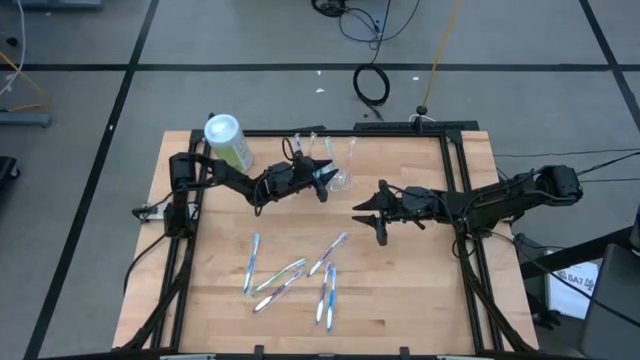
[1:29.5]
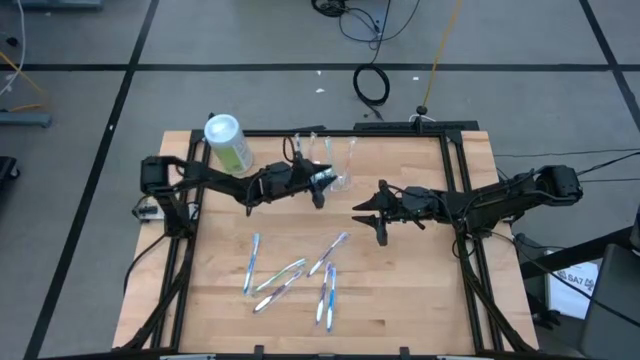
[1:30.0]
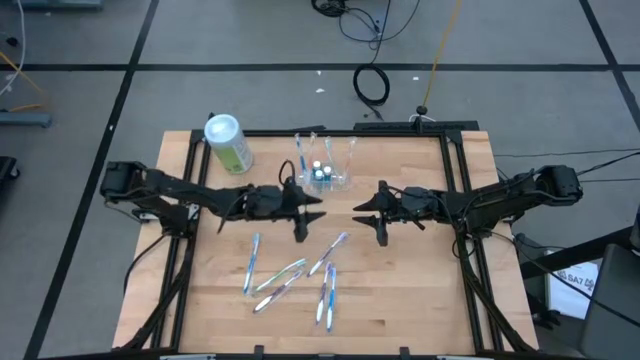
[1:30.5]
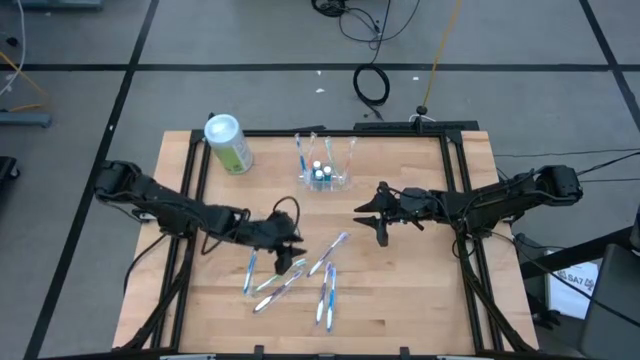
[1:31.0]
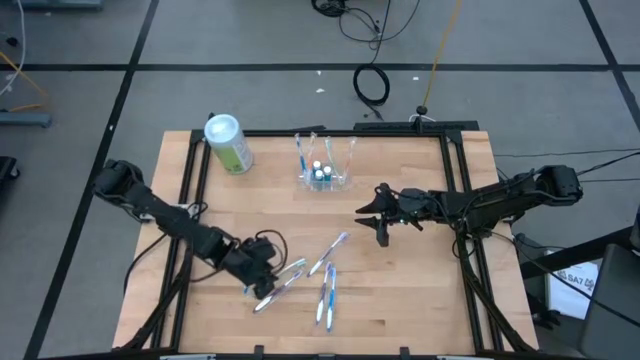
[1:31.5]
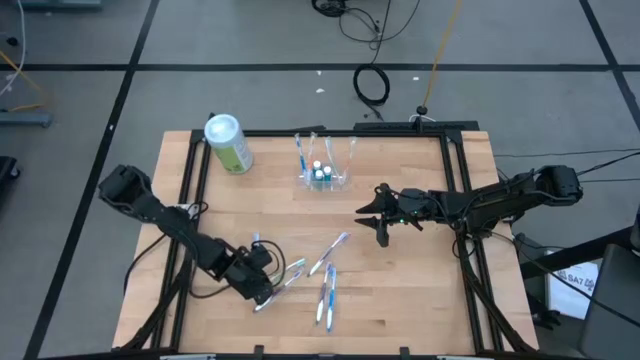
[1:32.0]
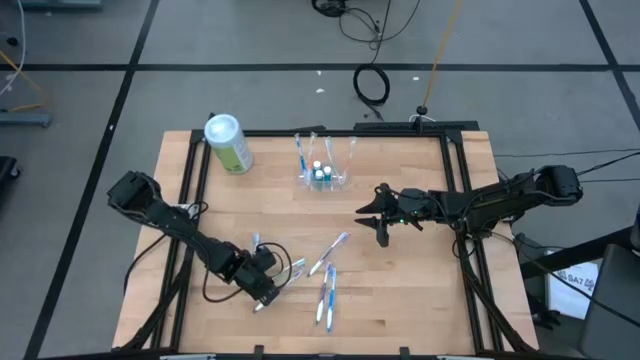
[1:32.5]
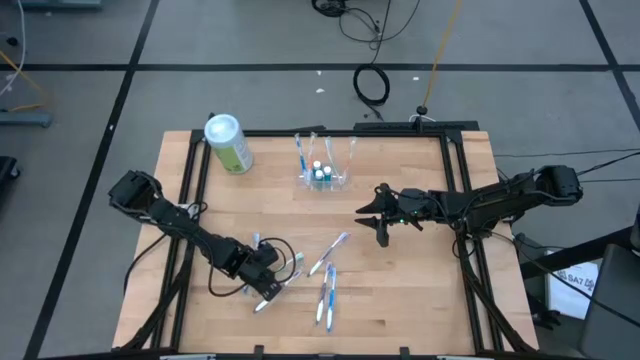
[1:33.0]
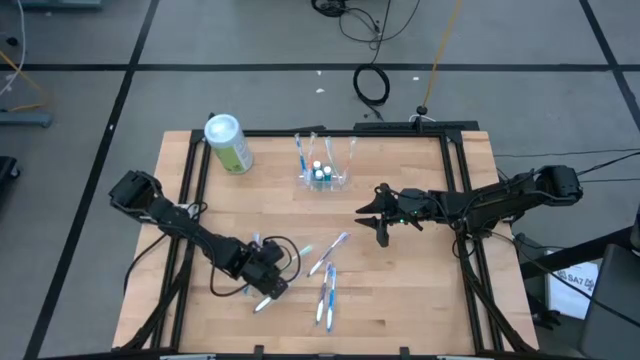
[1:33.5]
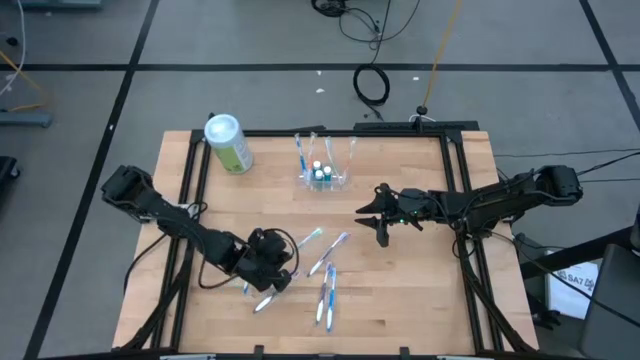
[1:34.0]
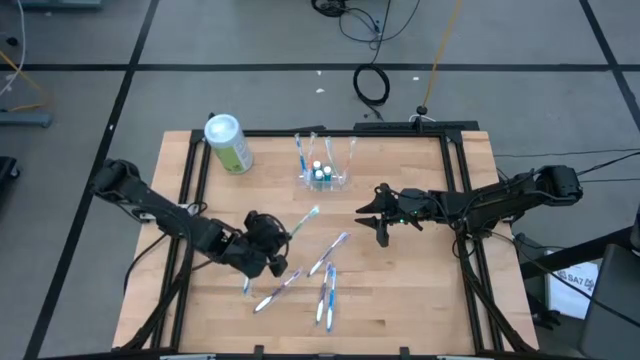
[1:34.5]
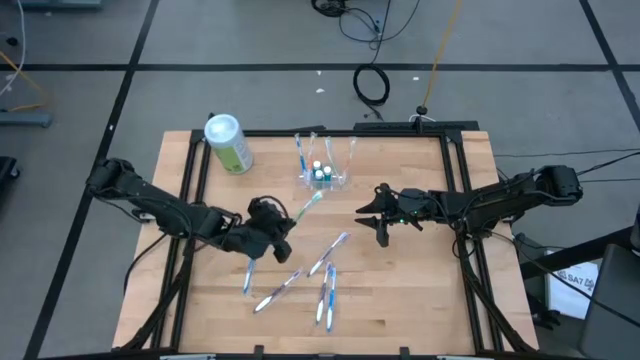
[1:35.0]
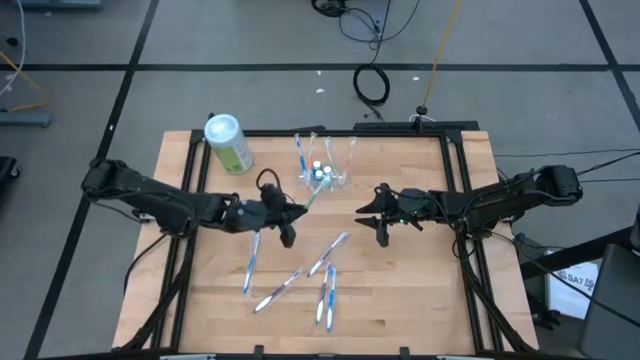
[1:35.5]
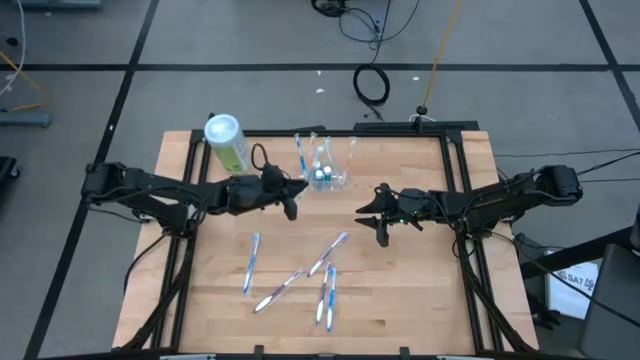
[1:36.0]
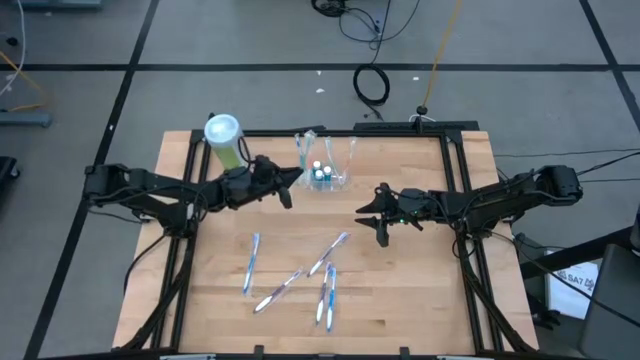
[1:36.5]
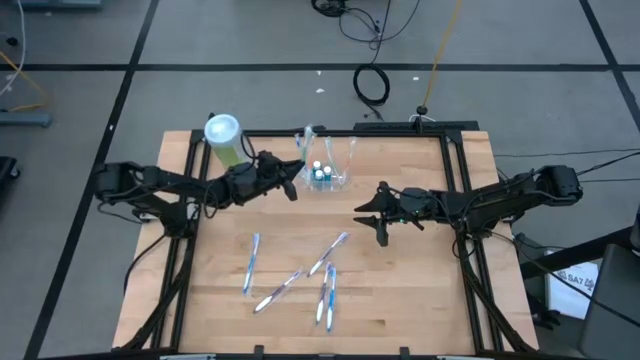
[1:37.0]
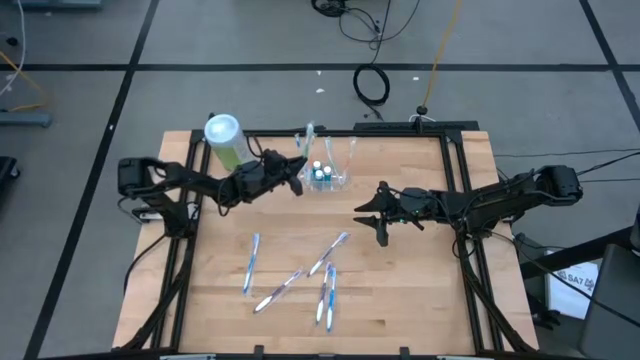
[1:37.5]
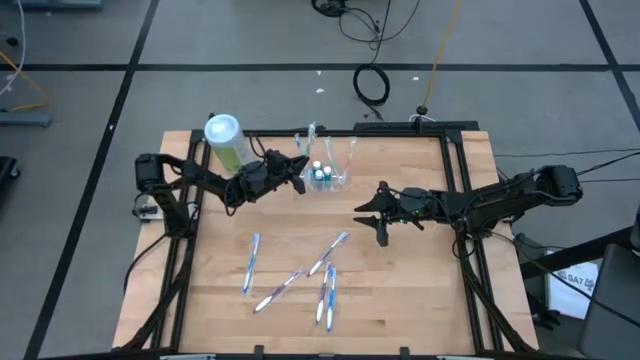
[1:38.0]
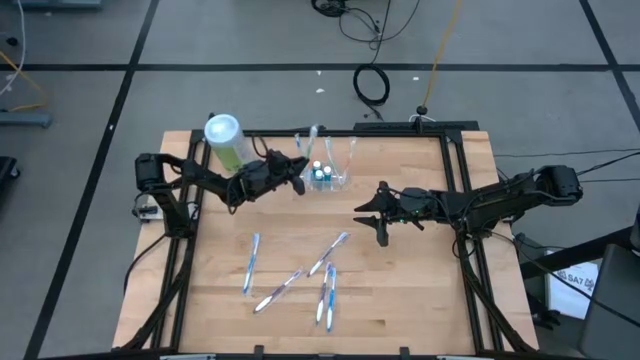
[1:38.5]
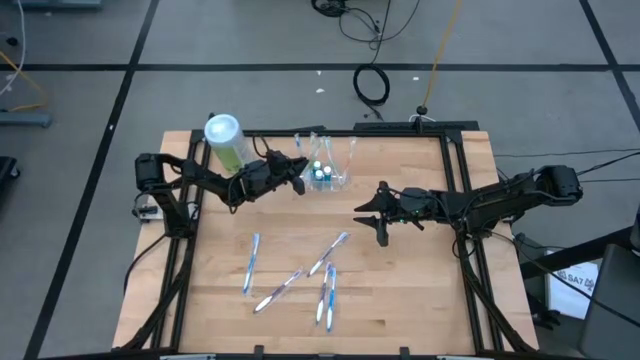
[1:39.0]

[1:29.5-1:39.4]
Task: Pick & Place toothbrushing station
Put the green toothbrush into the transparent organizer

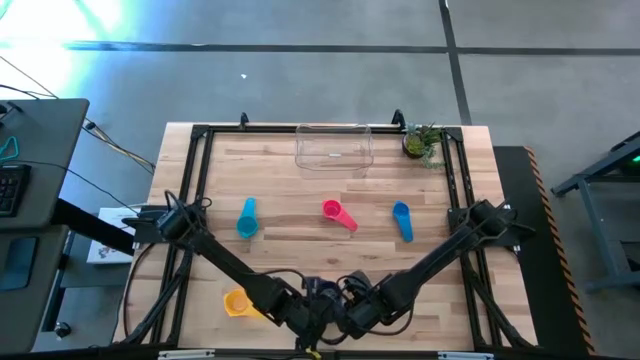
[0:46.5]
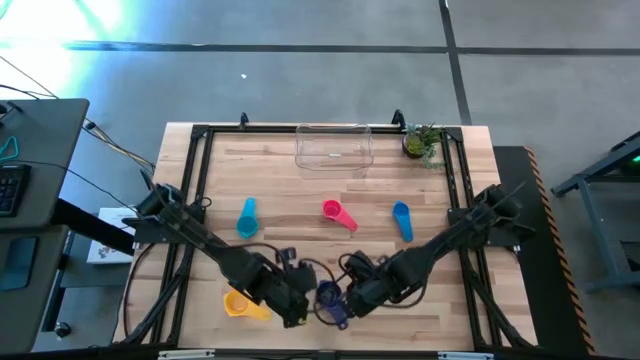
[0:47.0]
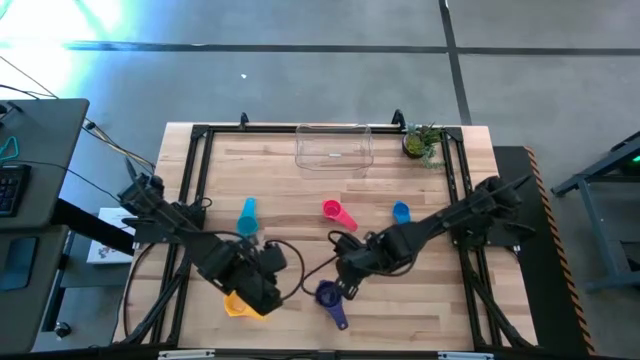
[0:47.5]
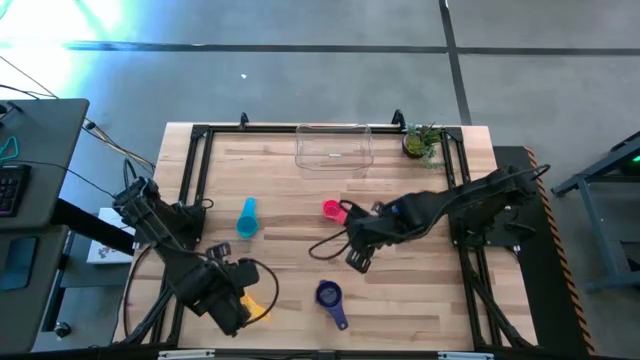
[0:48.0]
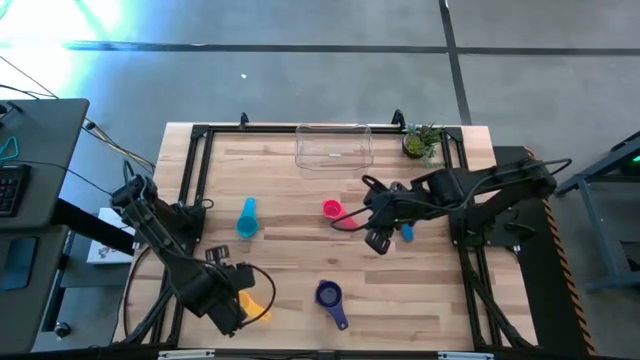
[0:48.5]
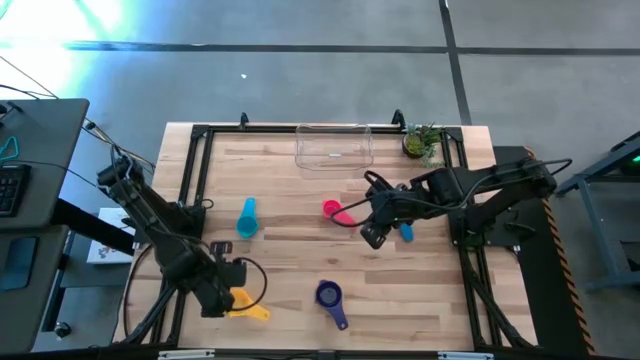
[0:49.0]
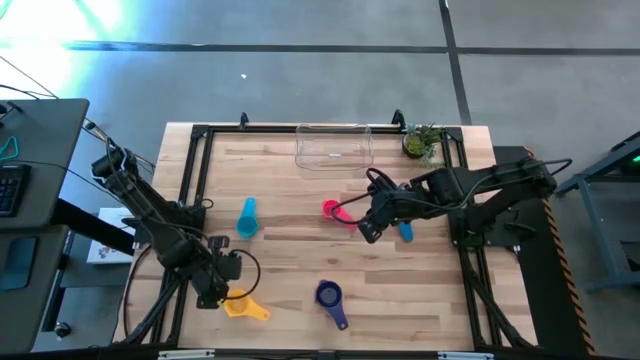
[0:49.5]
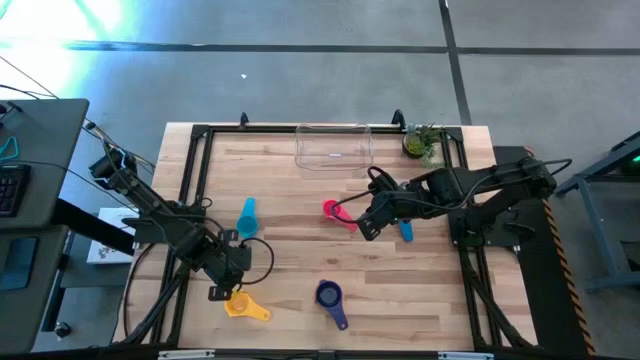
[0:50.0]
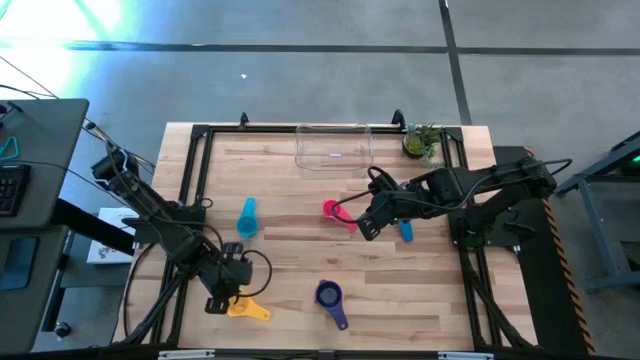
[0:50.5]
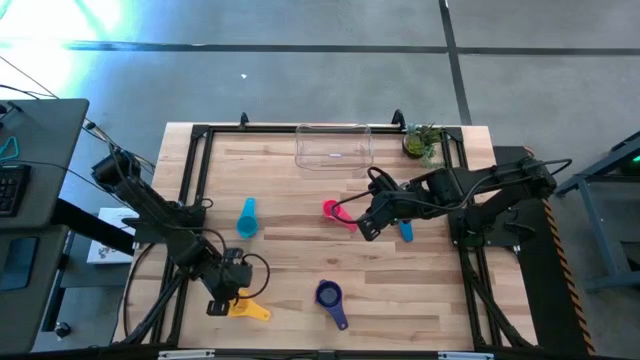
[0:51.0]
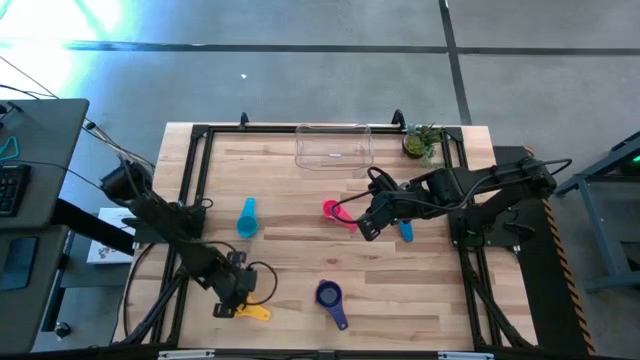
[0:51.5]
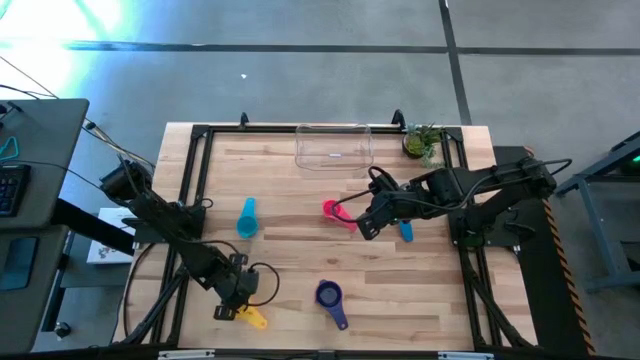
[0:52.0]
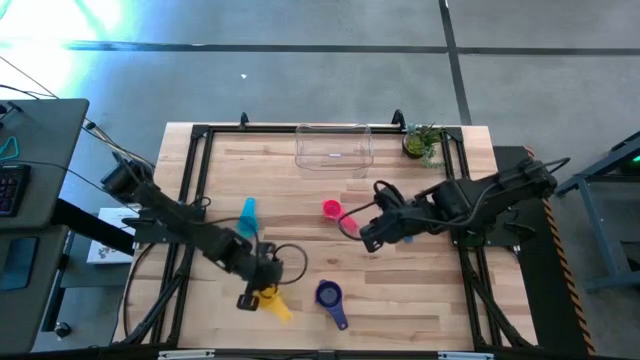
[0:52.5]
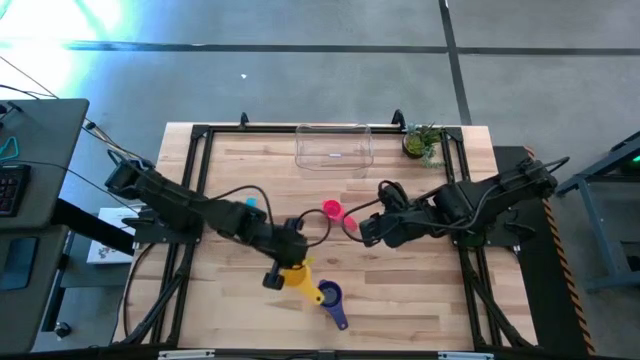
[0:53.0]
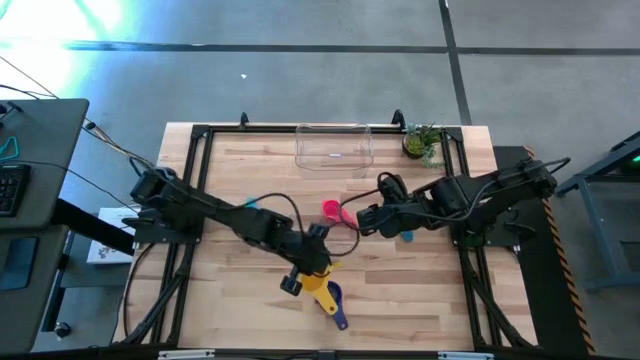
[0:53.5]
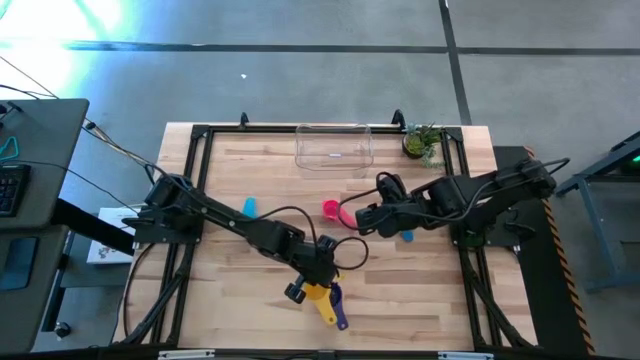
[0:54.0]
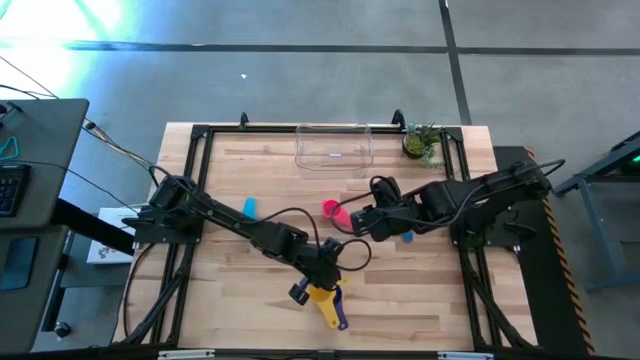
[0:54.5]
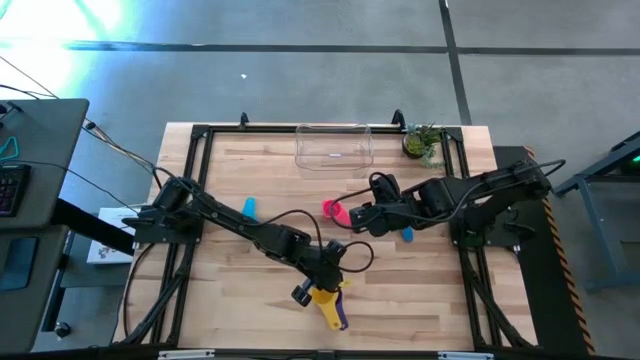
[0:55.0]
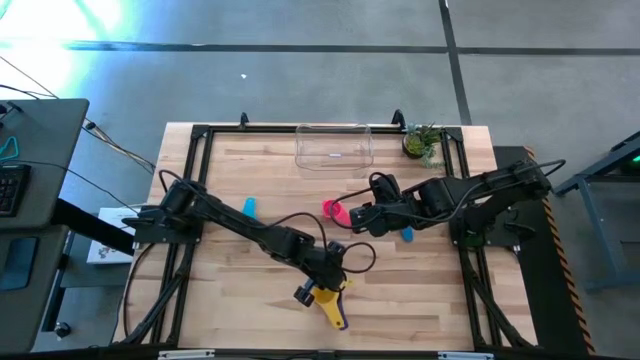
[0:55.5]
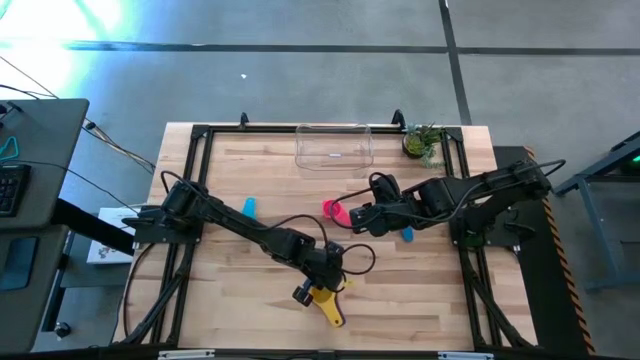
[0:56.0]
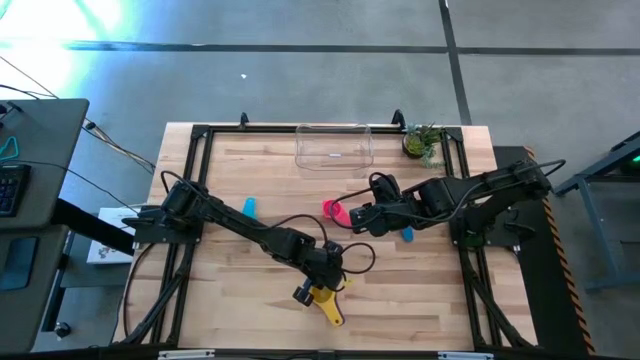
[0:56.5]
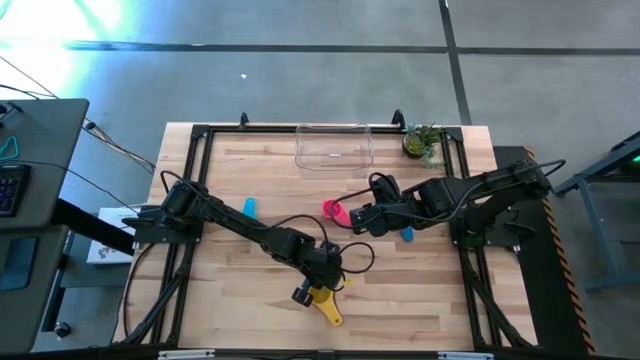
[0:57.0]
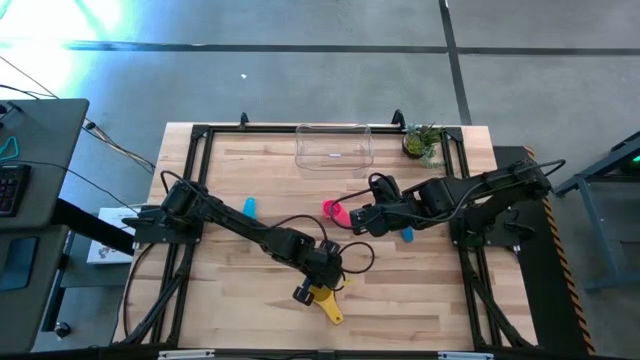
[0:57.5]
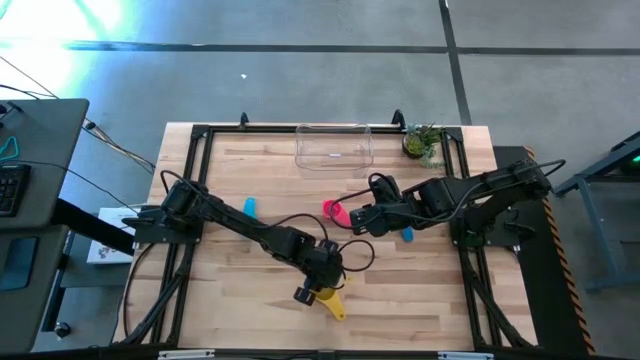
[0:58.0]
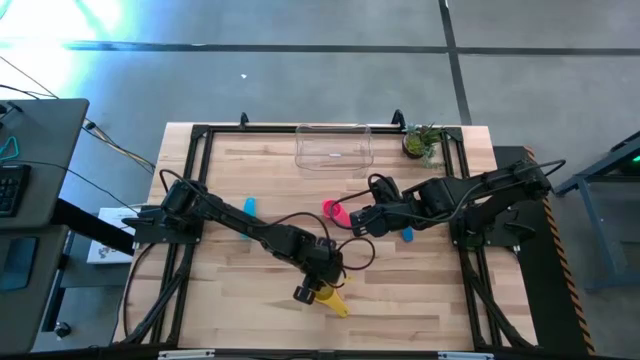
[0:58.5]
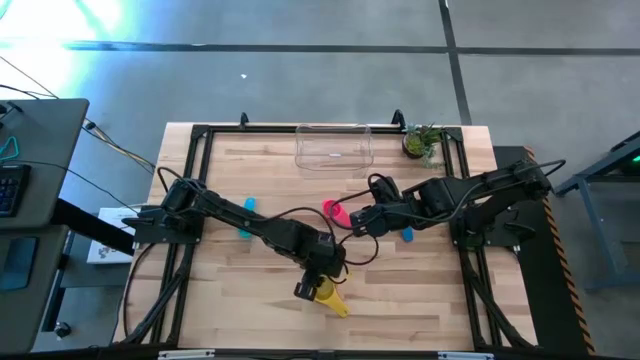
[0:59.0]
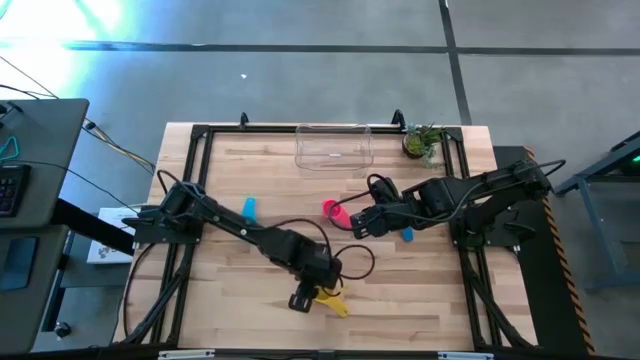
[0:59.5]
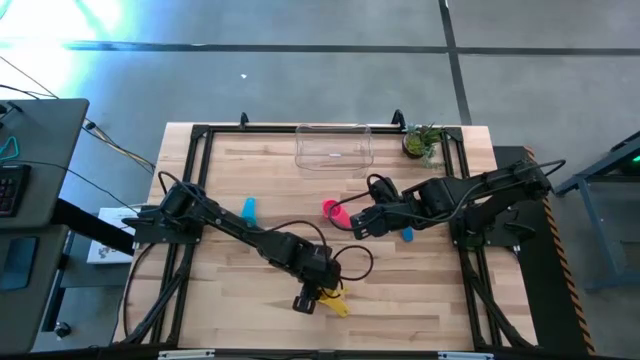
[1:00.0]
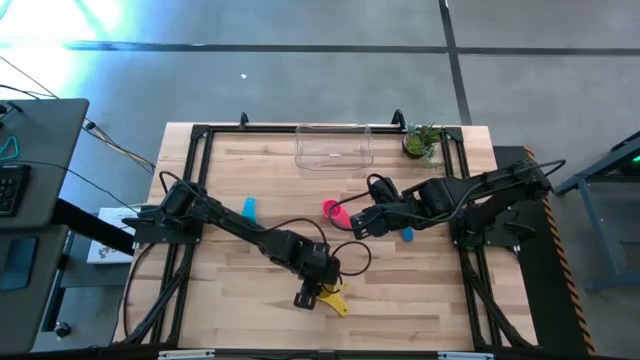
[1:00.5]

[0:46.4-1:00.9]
Task: Nest measuring cups in basket
Stack the yellow measuring cup on the dark blue measuring cup
